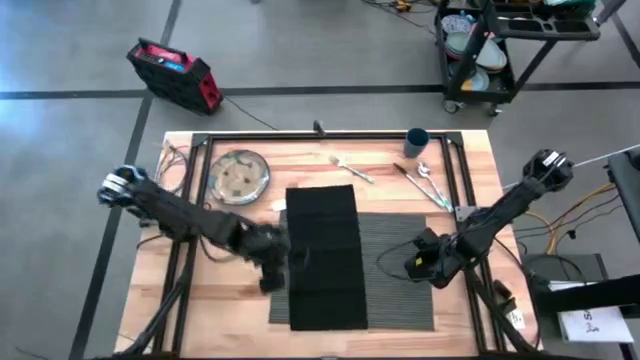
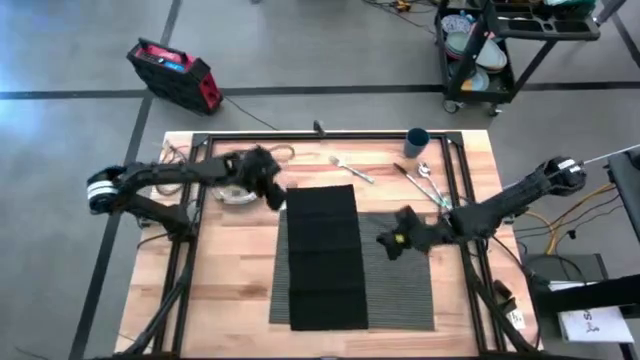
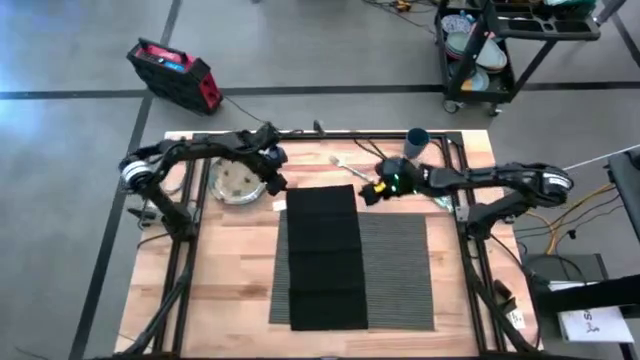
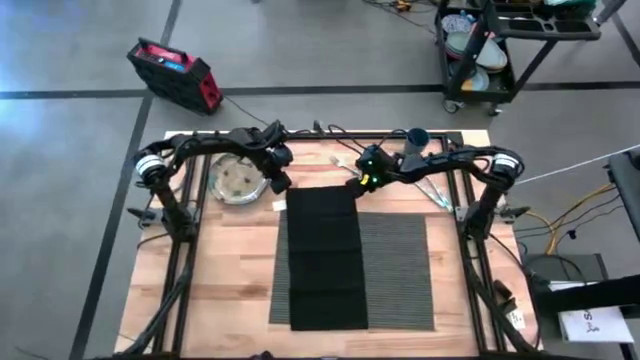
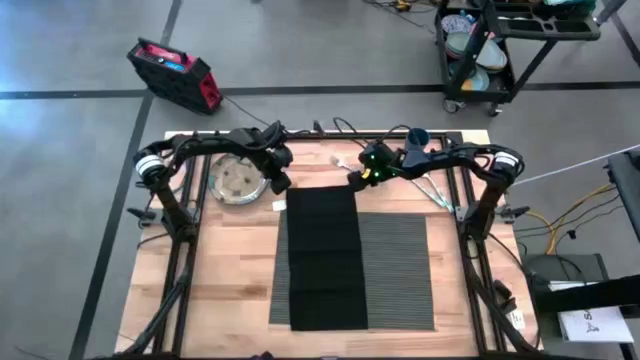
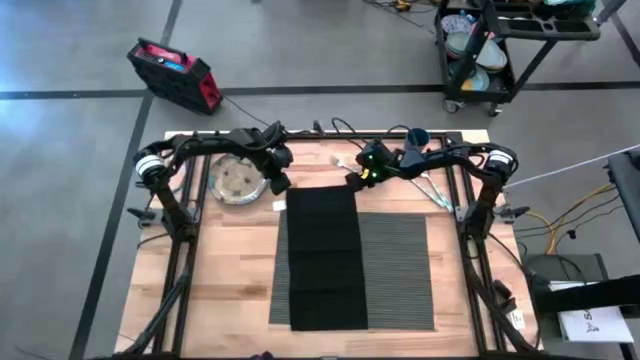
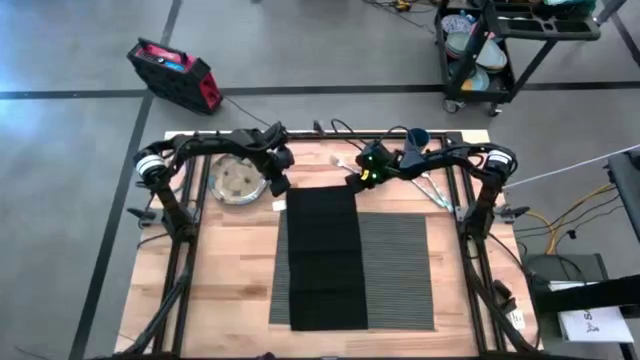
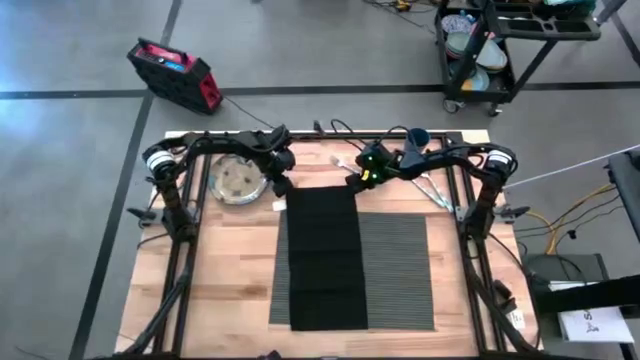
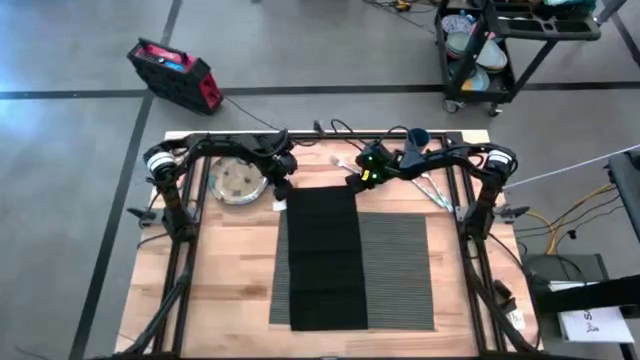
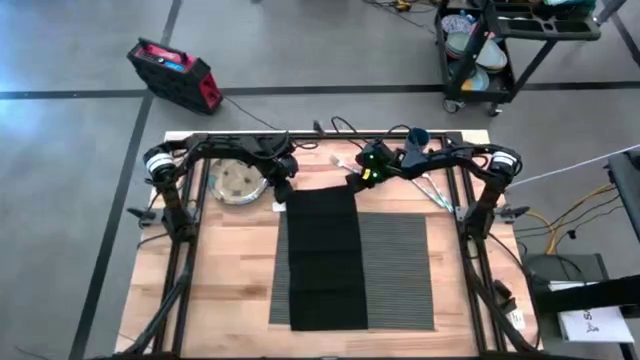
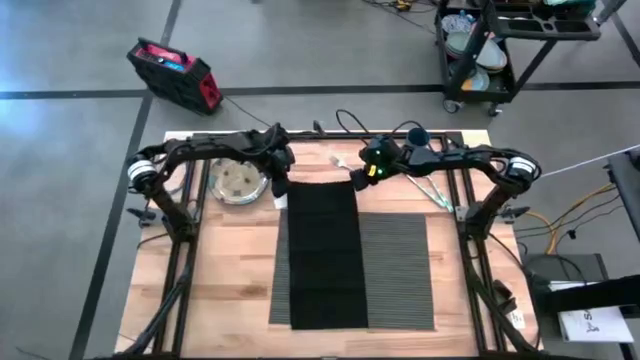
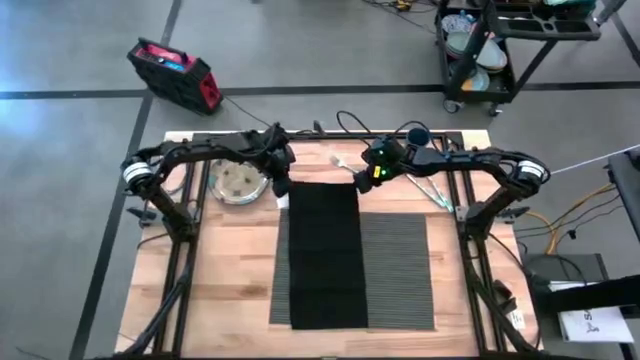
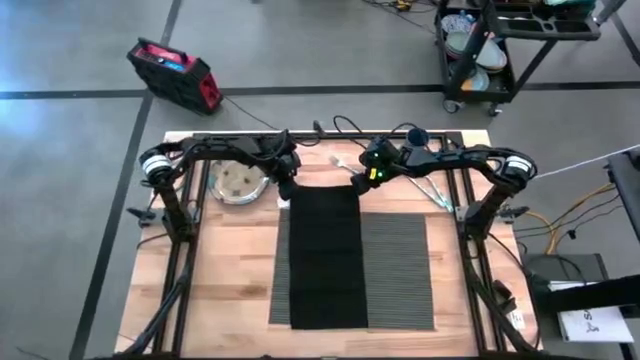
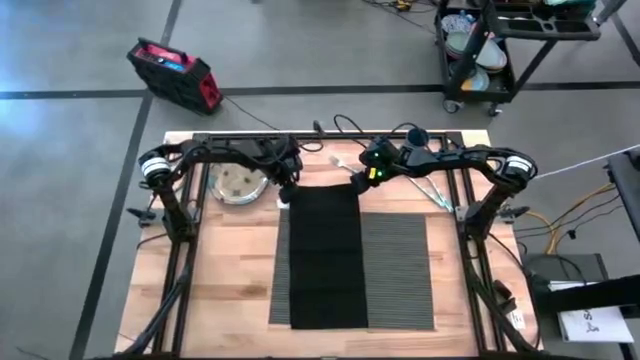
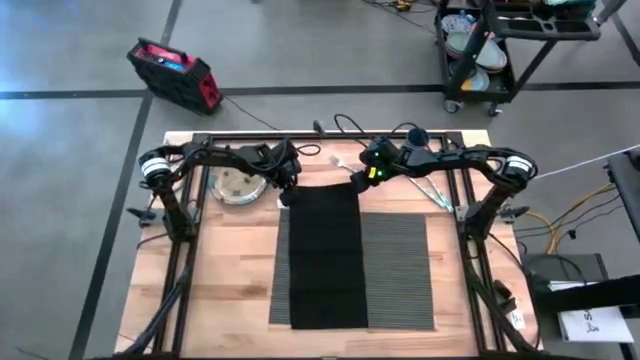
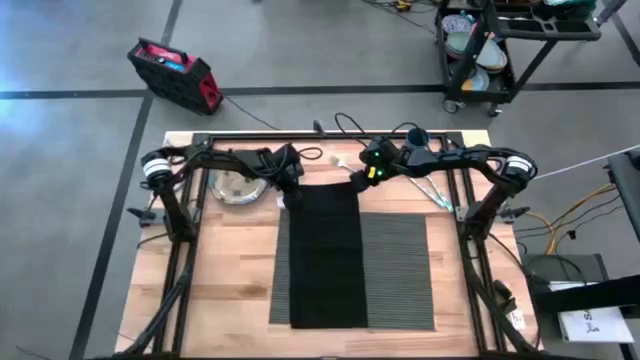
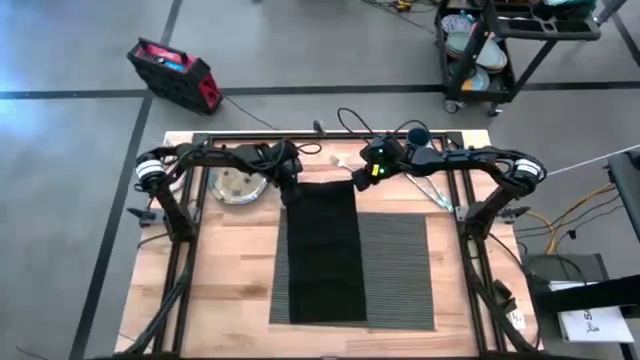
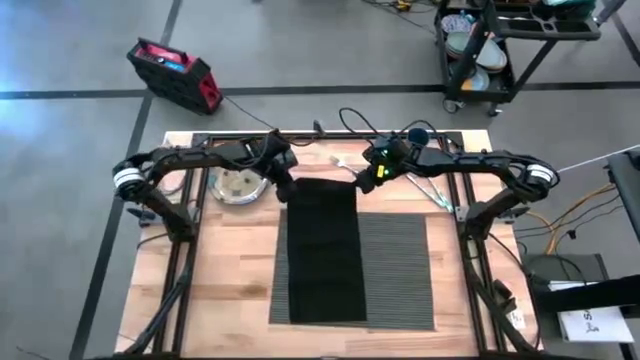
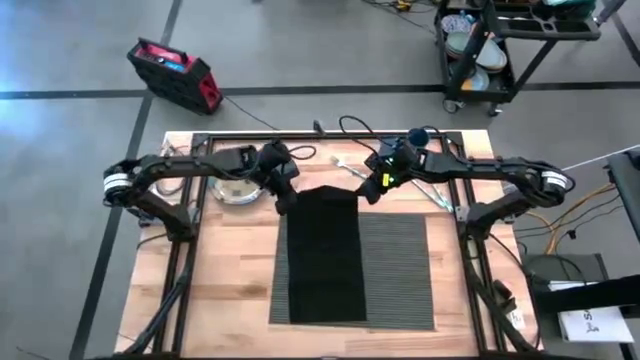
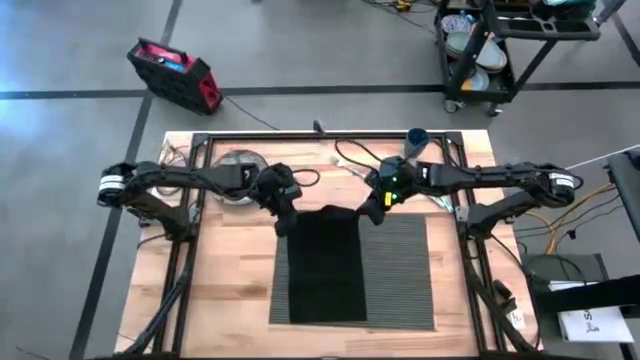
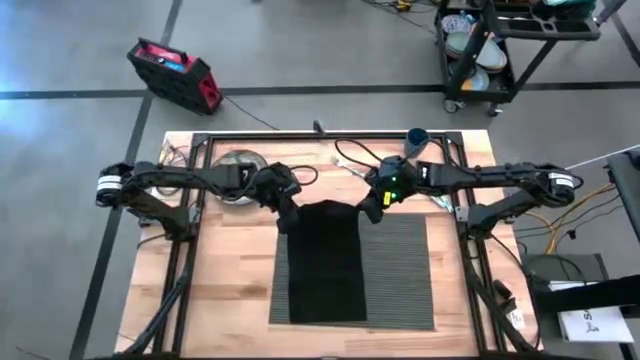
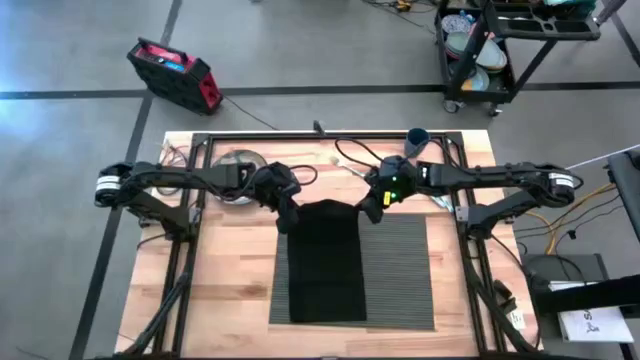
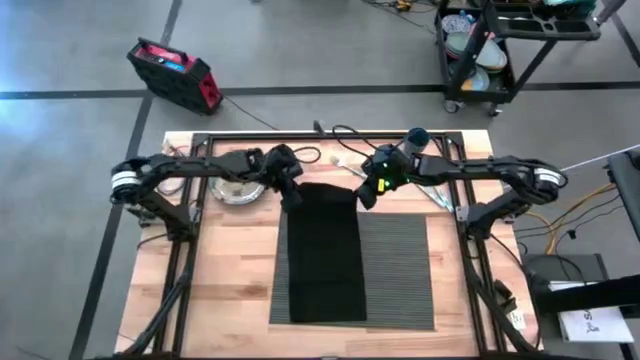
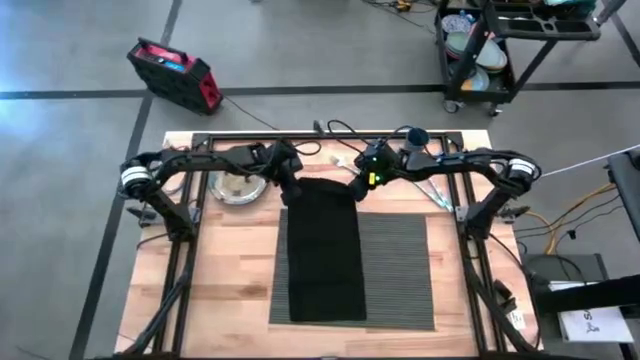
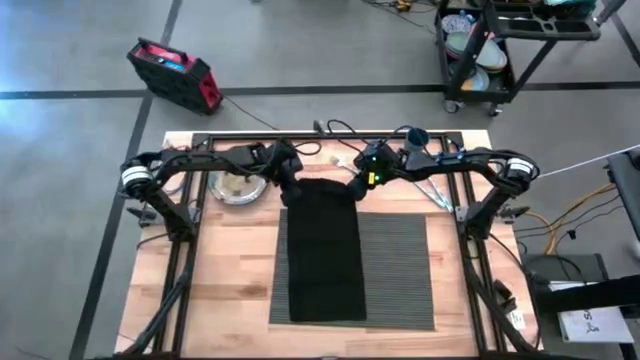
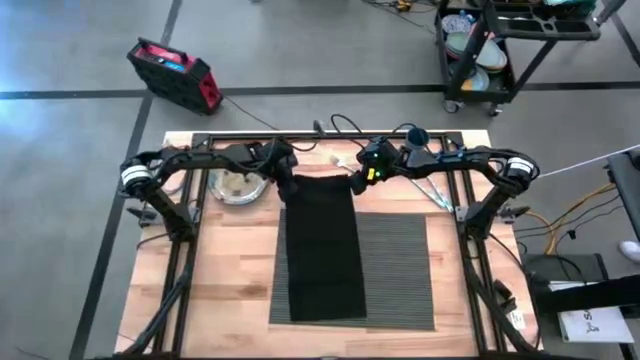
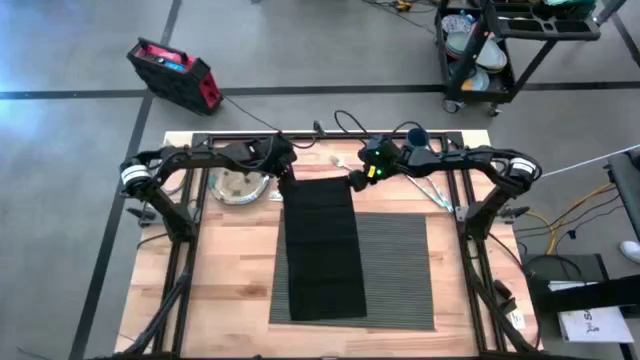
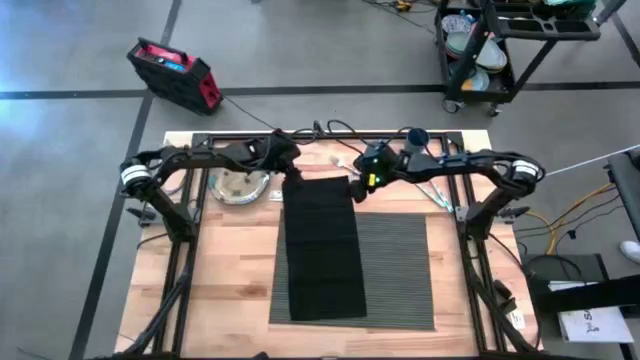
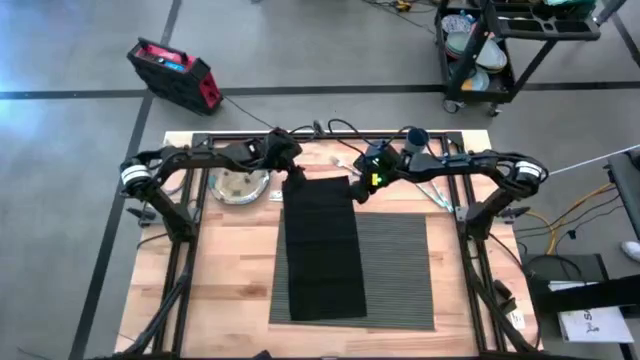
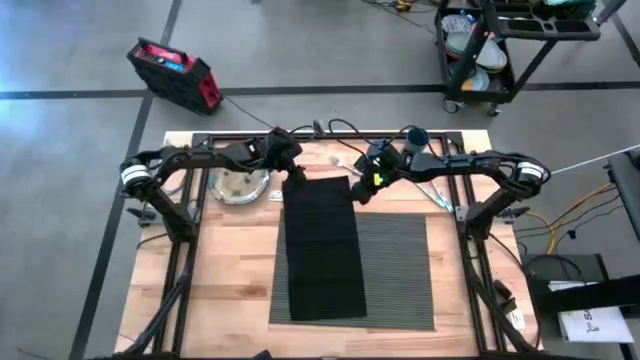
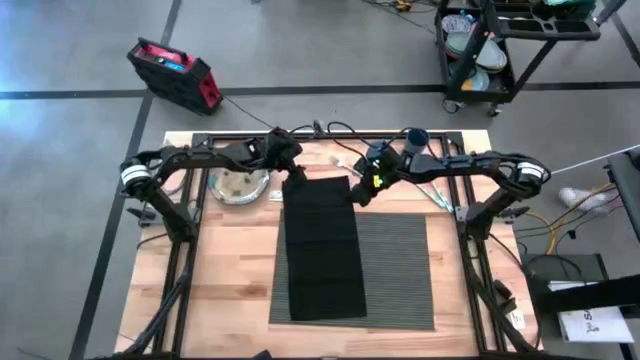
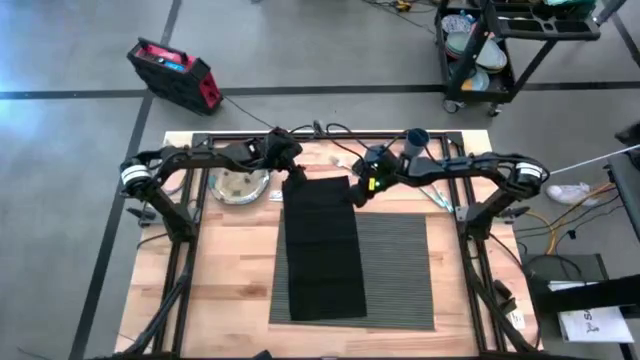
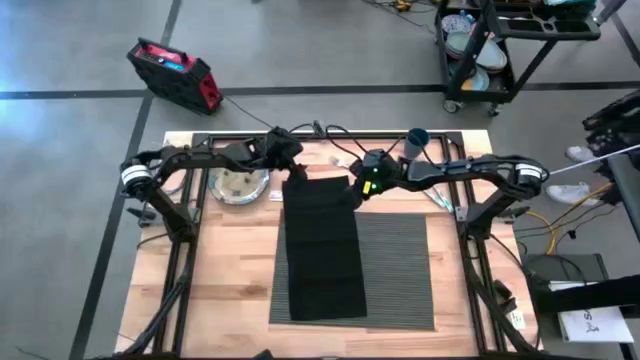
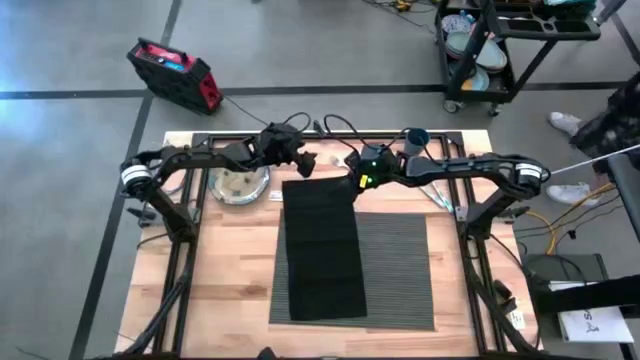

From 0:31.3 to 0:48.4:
Task: Set table place
Fold the black napkin

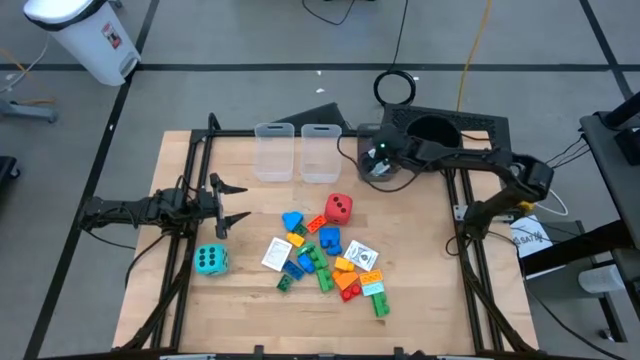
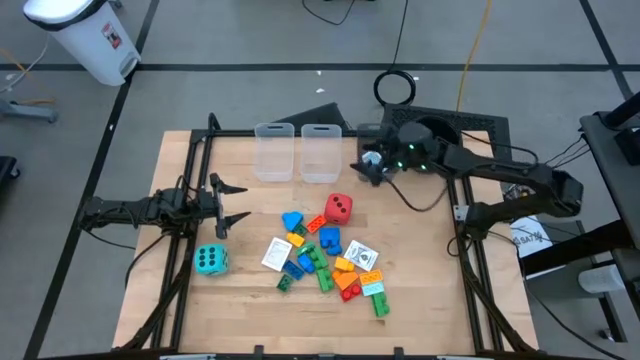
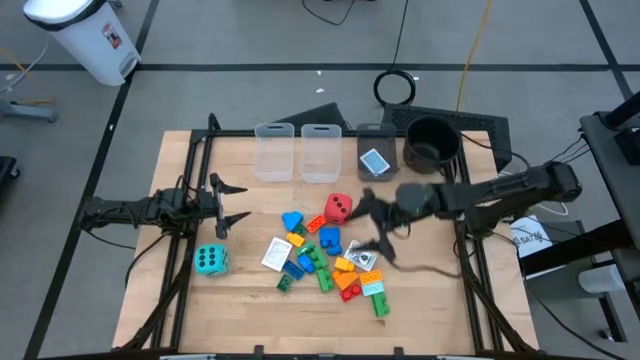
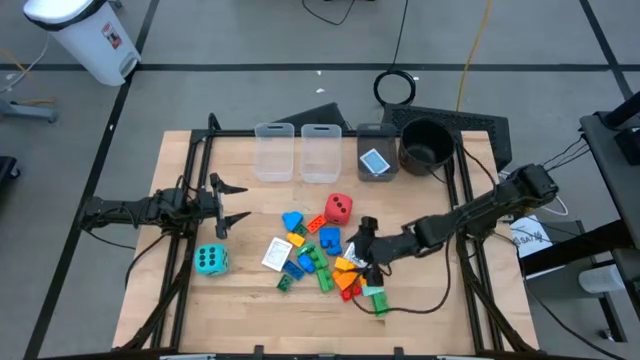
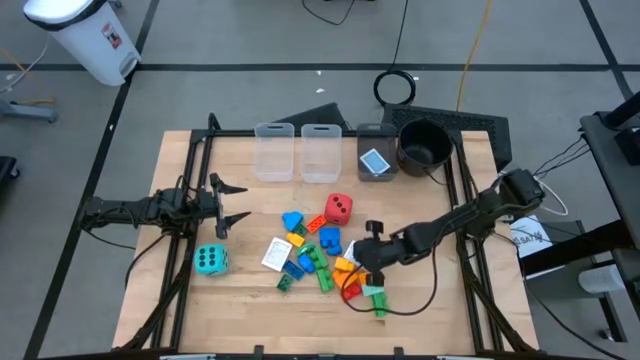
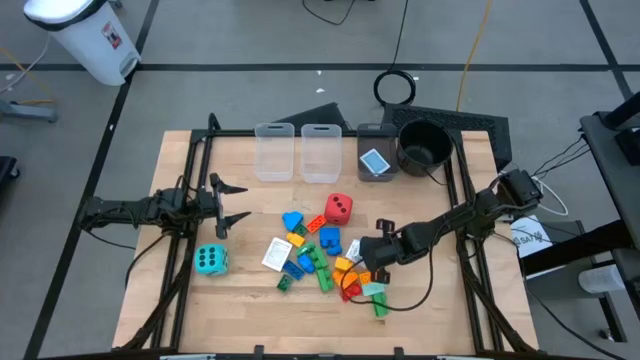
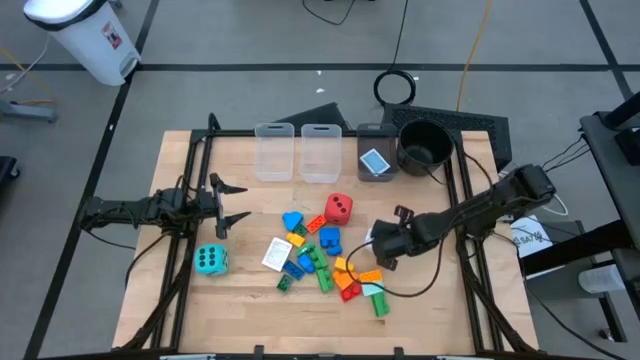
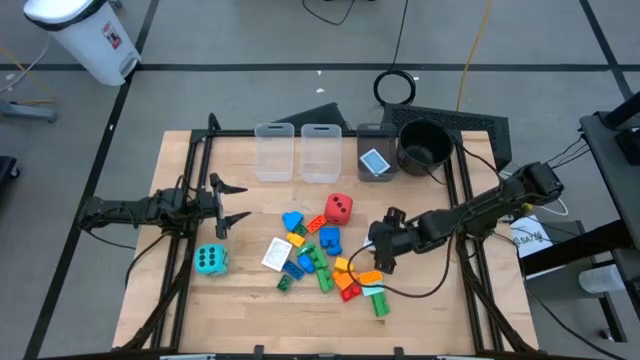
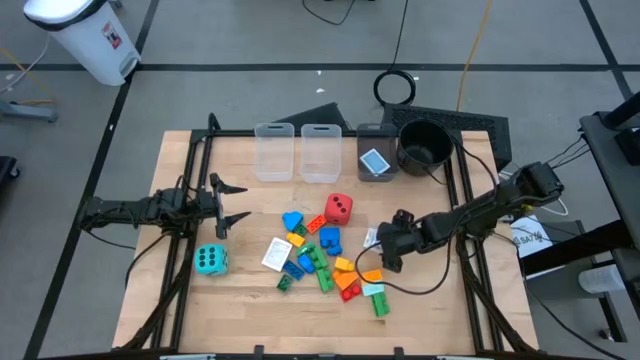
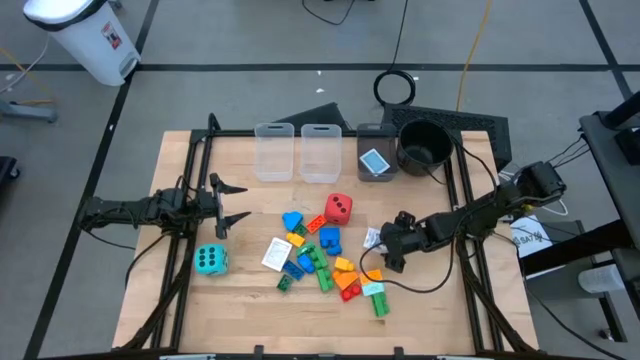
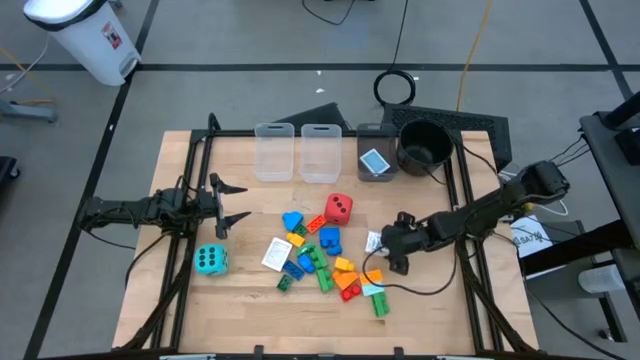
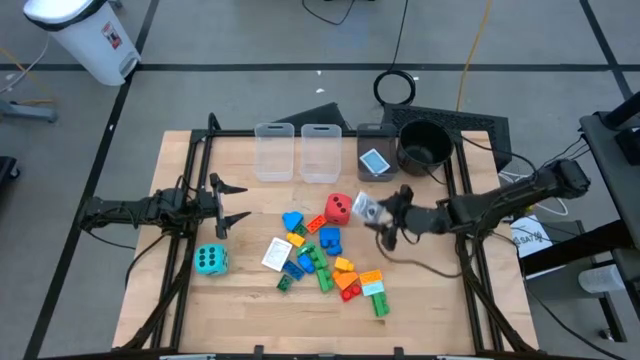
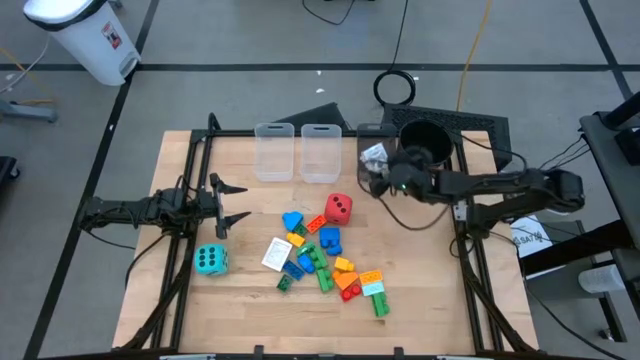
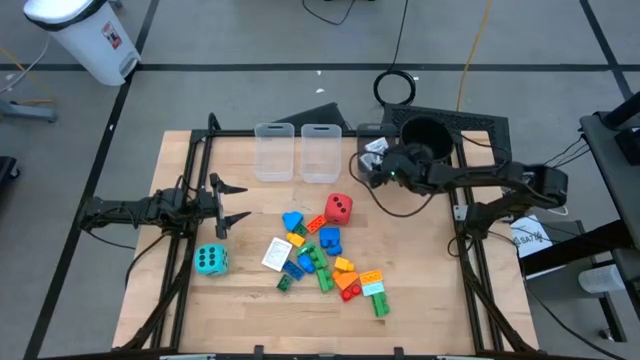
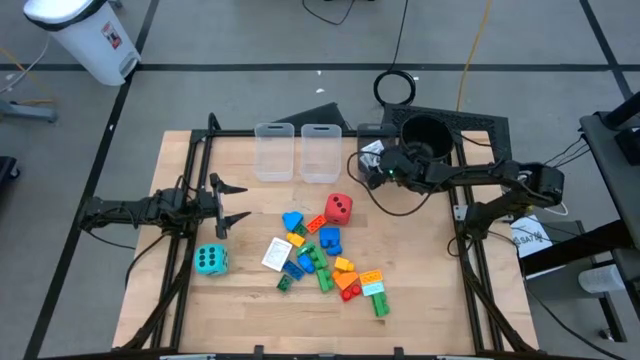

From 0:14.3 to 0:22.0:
Task: Pick & Place Toys
Put the black deck of cards into the black bin
